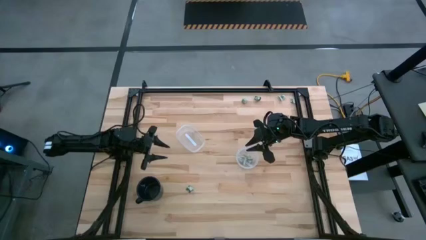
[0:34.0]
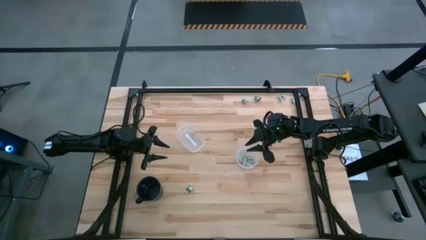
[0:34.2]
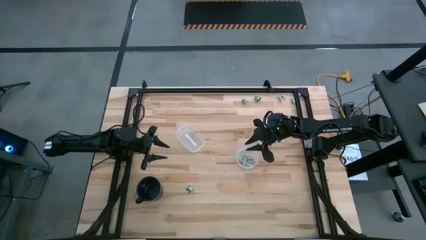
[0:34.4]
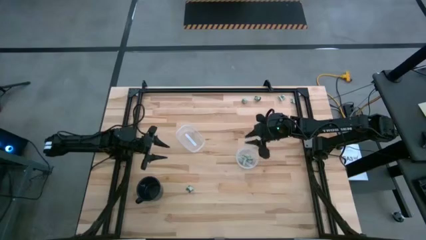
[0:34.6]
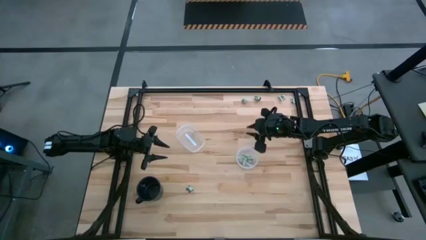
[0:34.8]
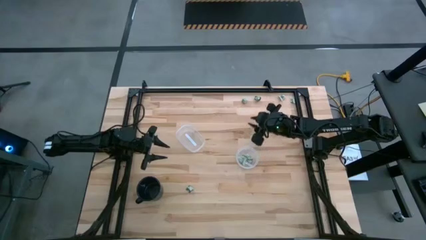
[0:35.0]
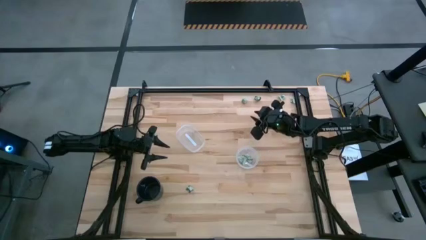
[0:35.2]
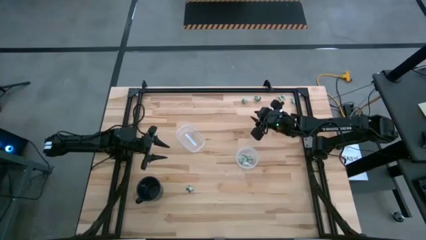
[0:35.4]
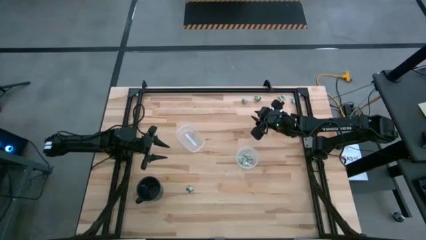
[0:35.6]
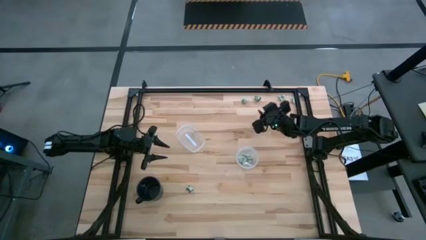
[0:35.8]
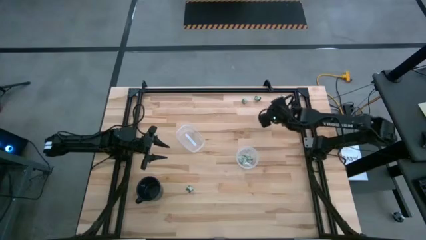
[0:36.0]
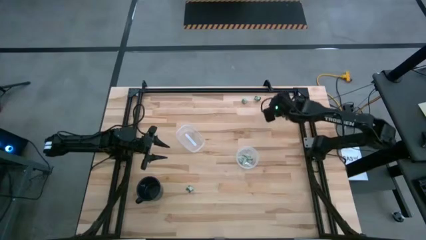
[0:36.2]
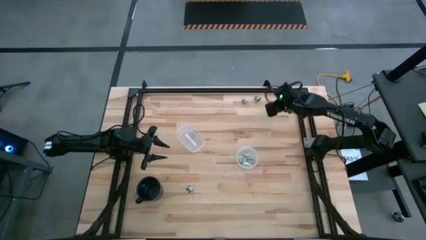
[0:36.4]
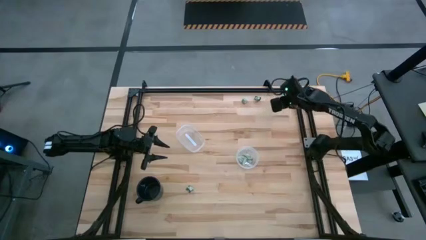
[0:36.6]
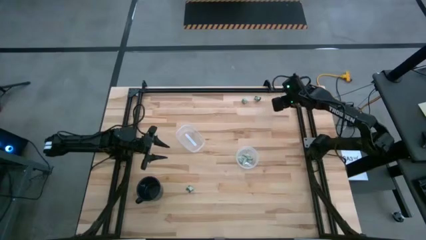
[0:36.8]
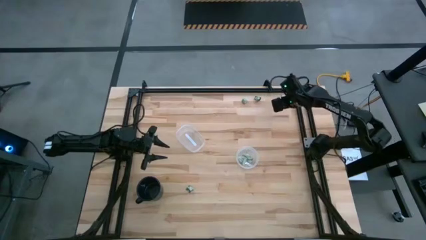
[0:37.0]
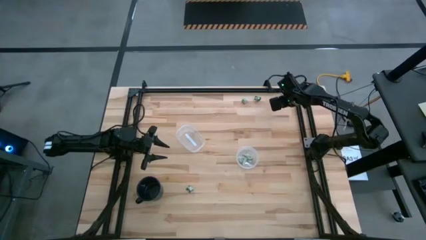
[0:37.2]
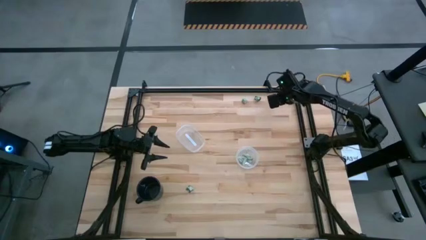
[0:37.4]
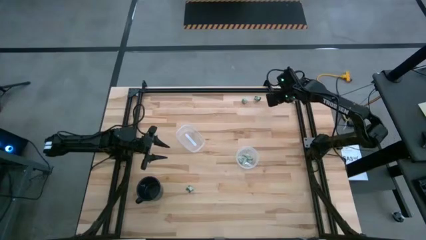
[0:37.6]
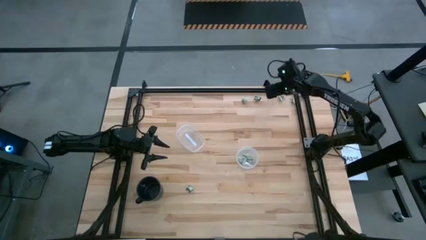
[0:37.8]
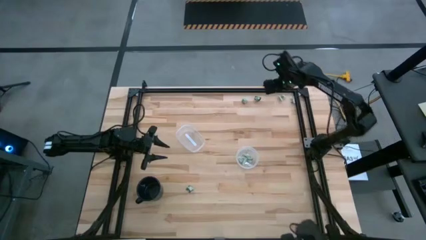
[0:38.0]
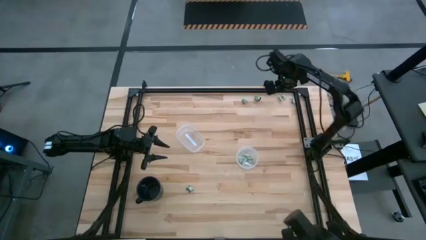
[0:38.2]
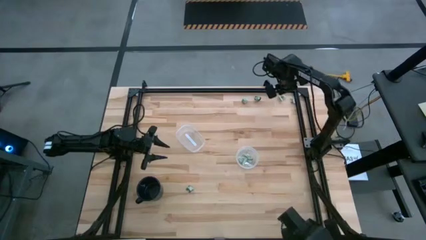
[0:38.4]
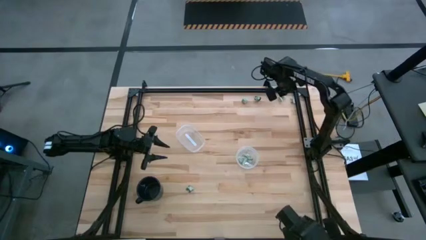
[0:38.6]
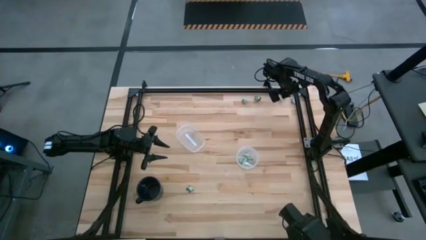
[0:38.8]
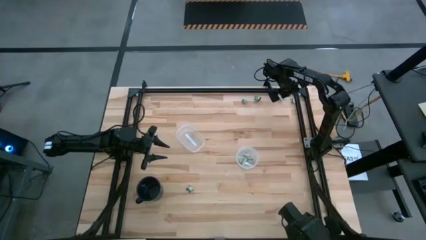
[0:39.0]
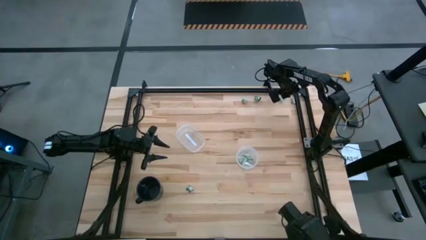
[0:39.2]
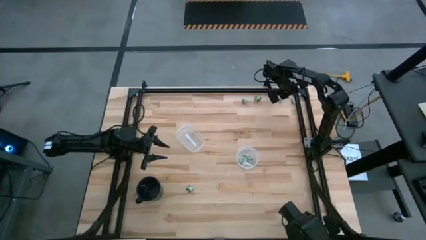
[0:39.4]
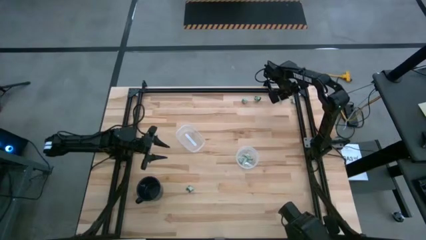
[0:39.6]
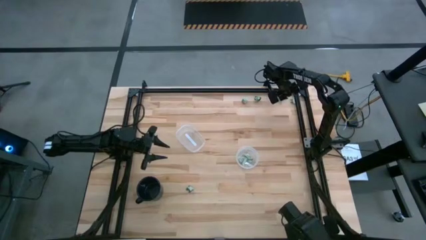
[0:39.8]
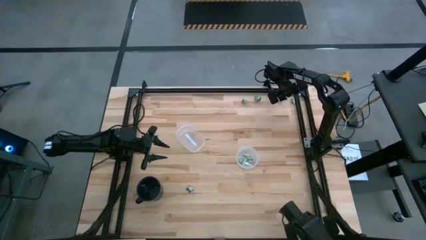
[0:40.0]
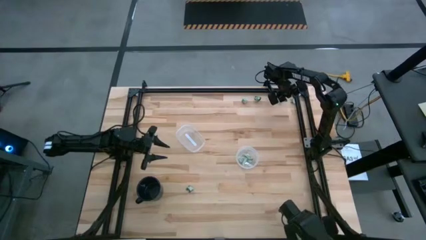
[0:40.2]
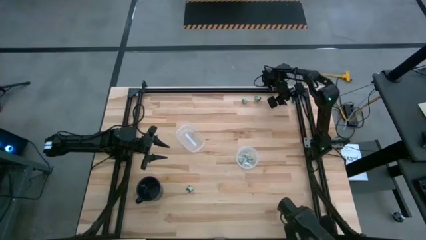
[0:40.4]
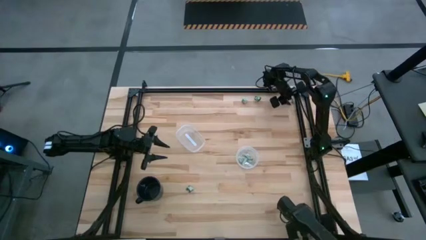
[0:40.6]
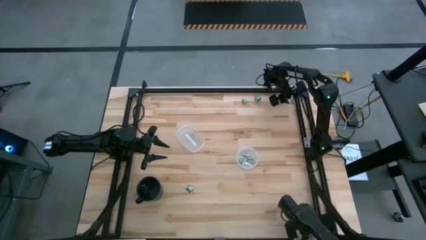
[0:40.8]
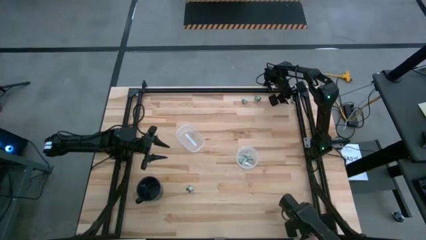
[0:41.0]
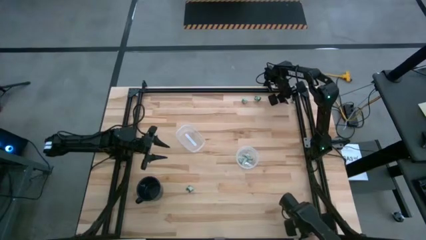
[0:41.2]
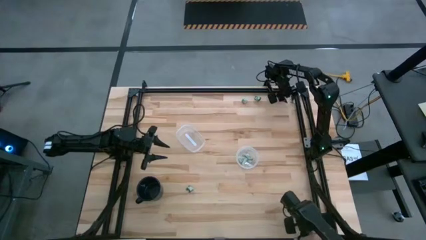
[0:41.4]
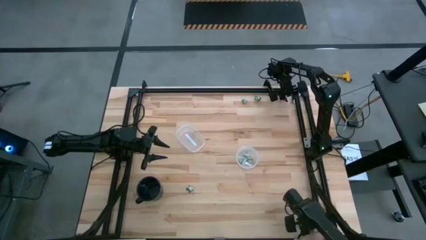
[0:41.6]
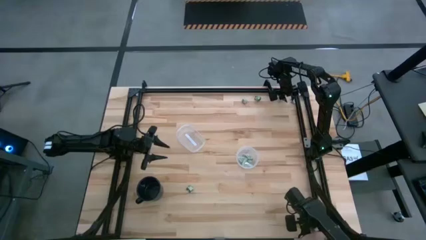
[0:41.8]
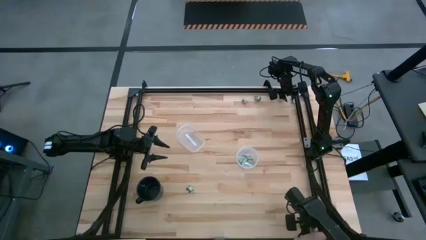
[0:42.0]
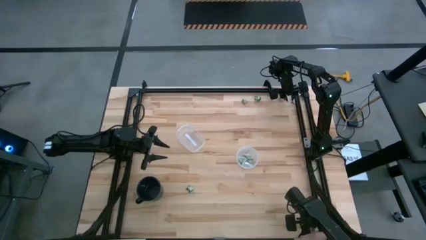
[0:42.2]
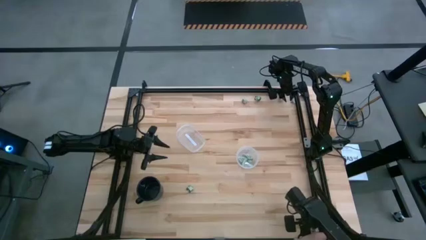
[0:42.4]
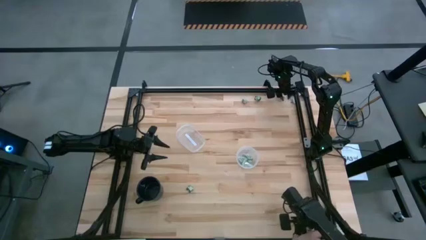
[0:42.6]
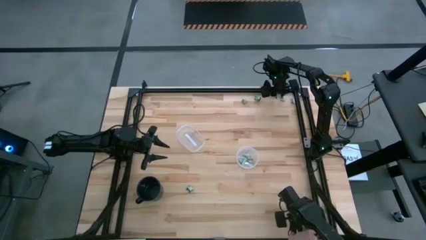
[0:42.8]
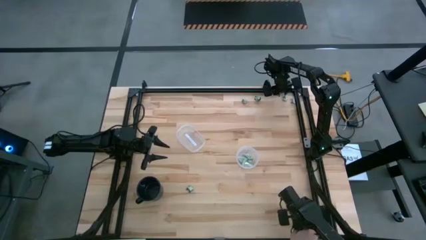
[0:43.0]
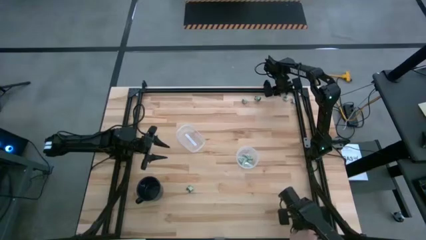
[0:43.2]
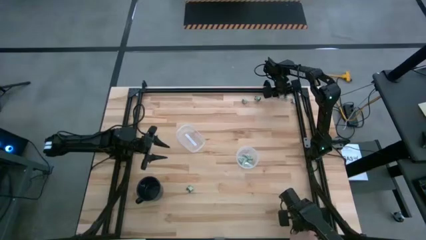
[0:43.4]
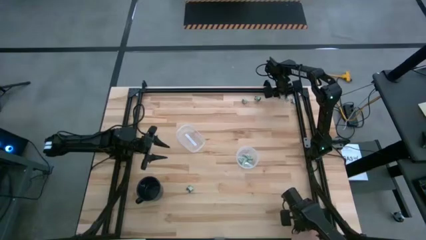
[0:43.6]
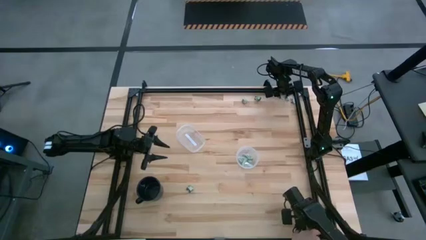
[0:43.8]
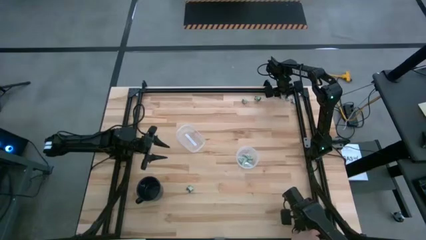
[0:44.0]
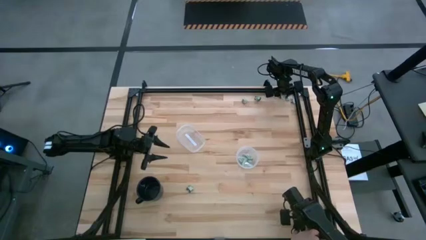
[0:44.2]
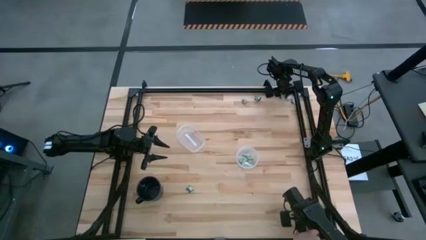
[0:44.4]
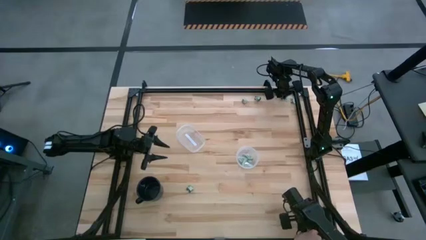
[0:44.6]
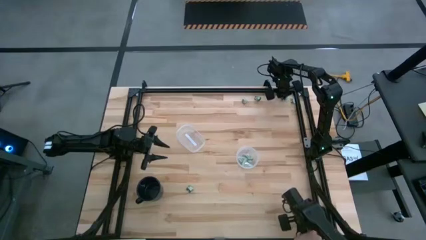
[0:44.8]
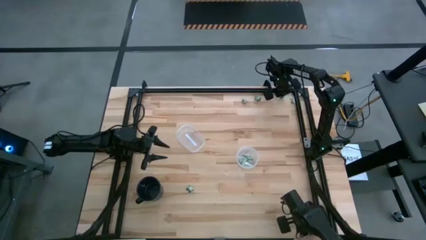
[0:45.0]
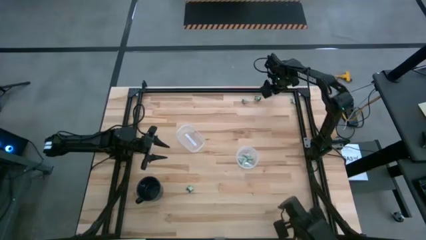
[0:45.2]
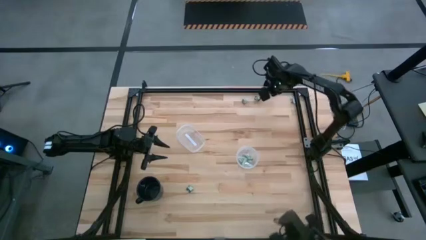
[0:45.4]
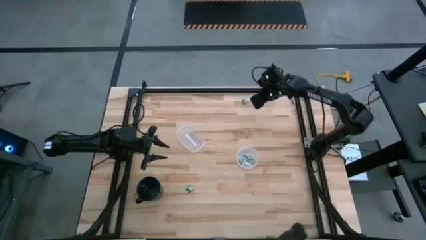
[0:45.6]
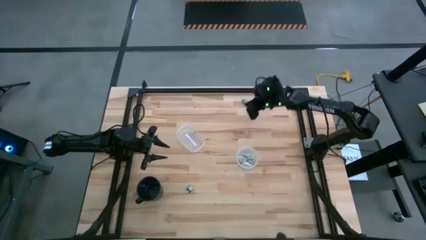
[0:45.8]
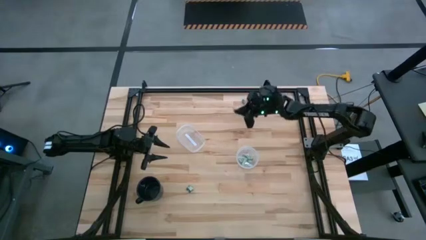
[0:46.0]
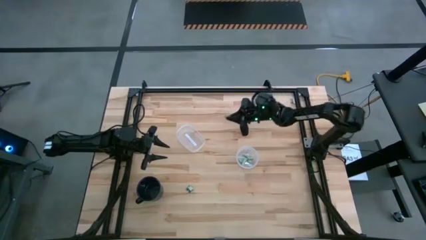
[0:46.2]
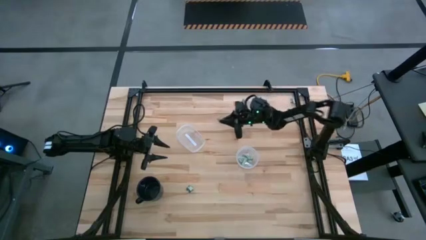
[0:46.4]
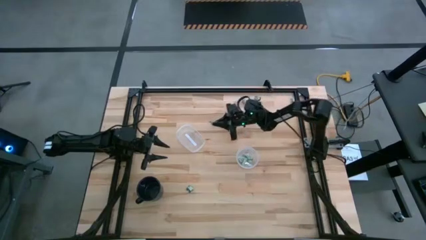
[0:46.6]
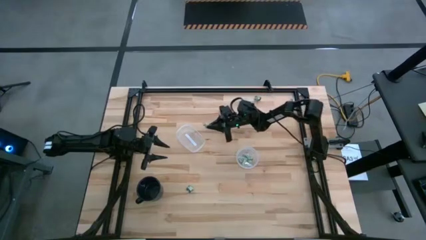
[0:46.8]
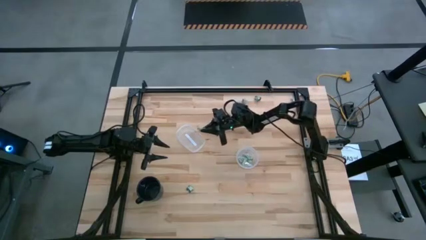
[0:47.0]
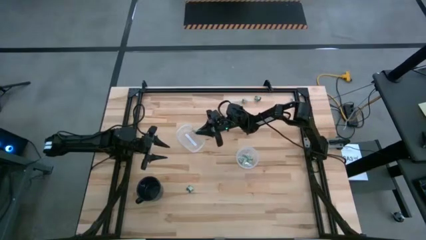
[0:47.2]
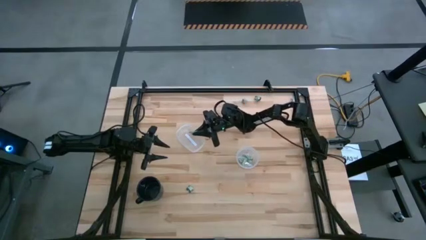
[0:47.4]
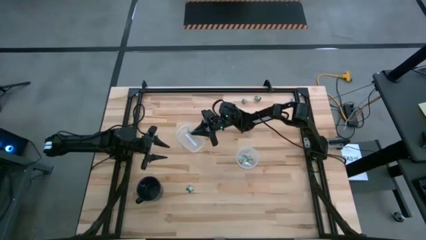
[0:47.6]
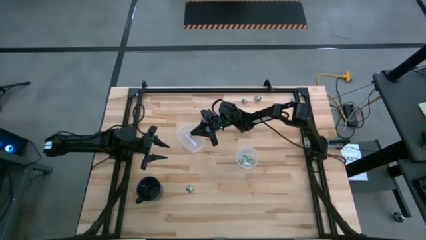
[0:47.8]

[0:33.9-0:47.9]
Task: Pick and place Stevia / Truvia into bins
Put the middle white stevia packet into the left transparent container
